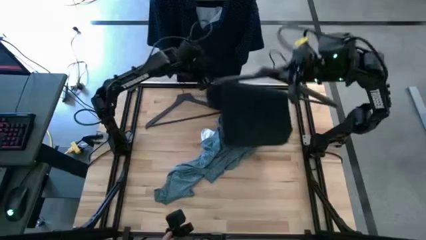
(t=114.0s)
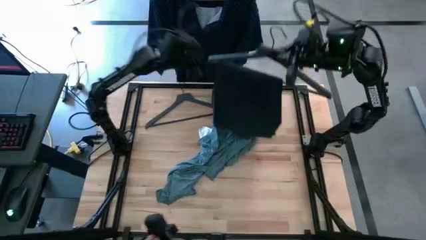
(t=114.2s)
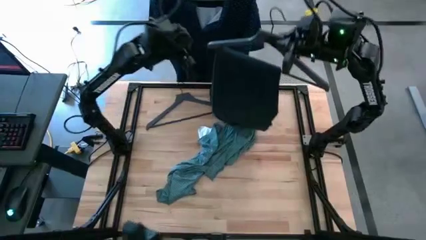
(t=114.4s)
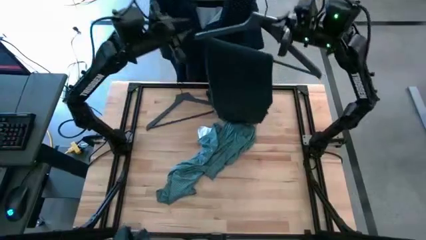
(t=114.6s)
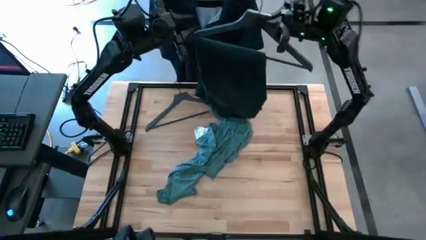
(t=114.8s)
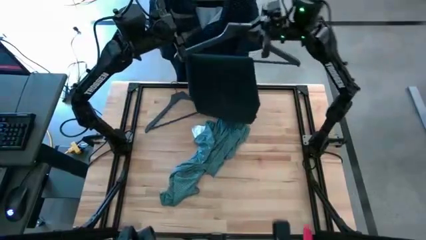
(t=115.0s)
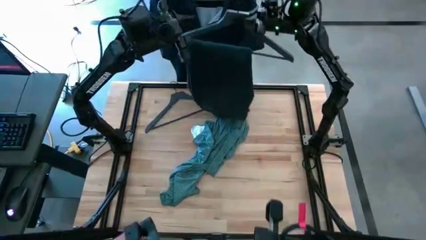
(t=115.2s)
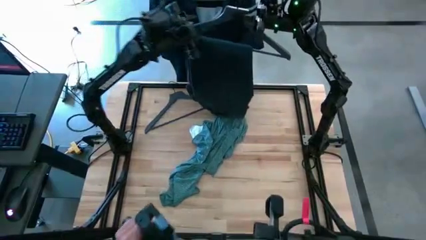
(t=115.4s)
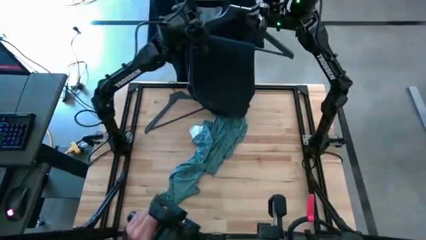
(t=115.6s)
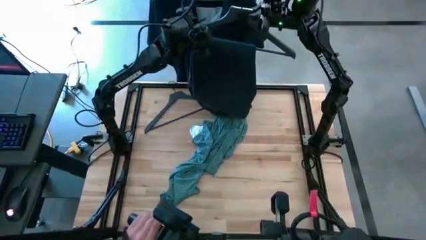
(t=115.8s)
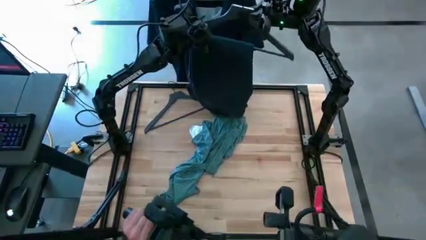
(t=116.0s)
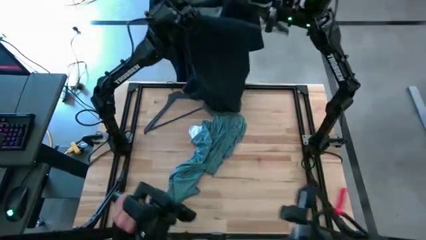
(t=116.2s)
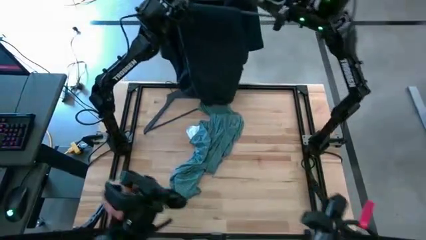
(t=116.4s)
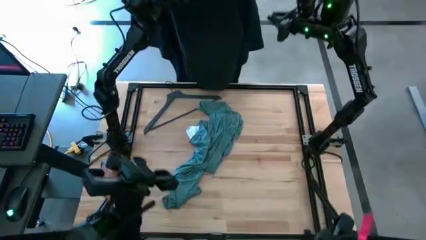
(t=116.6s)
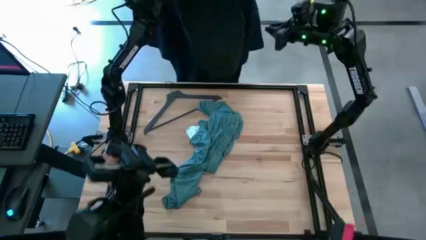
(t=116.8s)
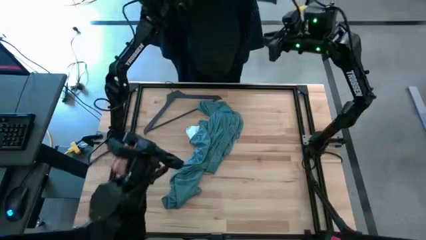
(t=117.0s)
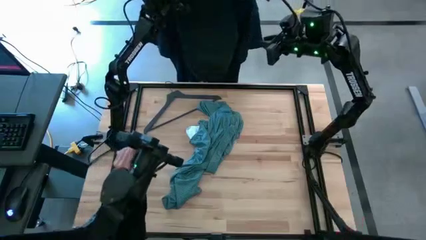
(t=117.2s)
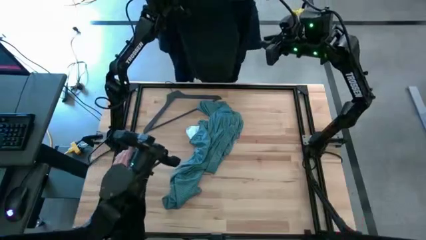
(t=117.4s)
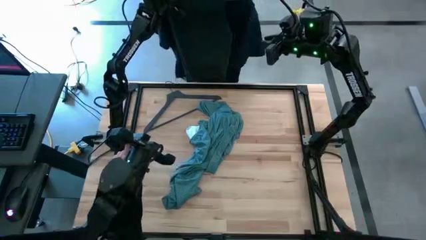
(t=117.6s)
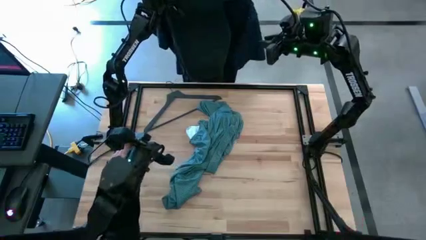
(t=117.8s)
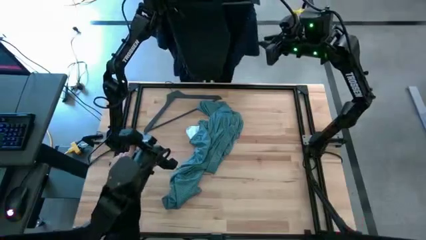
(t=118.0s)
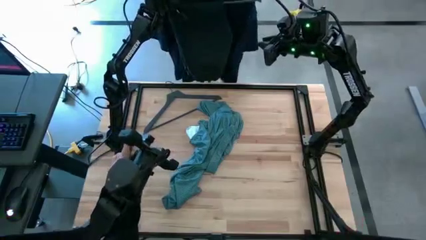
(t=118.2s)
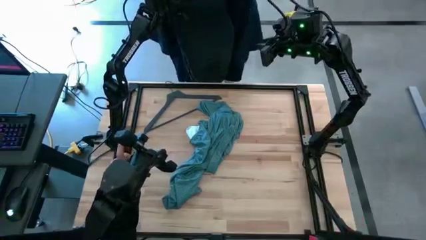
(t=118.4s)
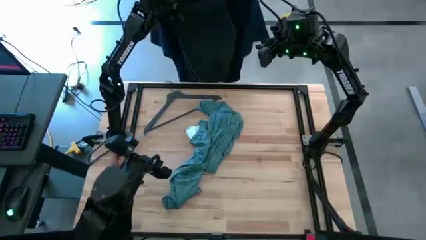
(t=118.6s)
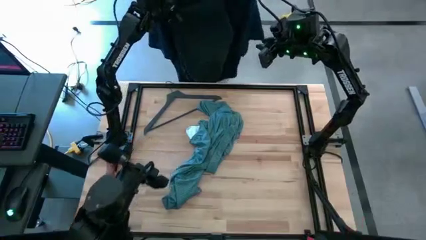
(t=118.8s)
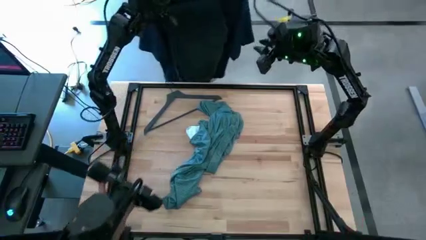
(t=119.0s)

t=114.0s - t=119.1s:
Task: Hang clothes
Hang the hangered blue pants on the hanger rack

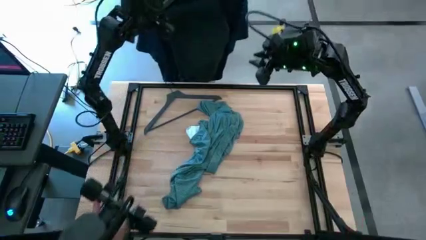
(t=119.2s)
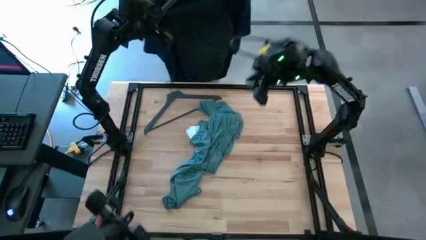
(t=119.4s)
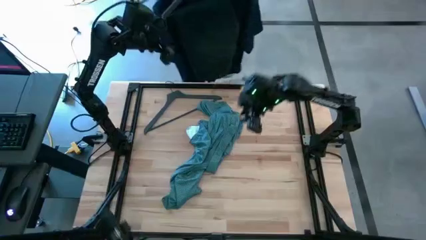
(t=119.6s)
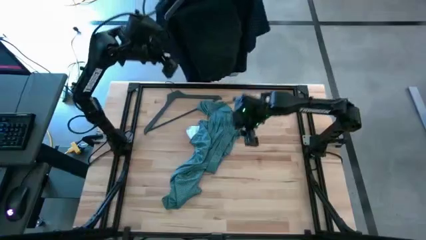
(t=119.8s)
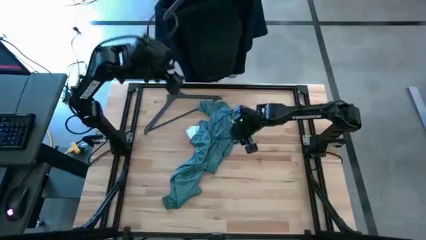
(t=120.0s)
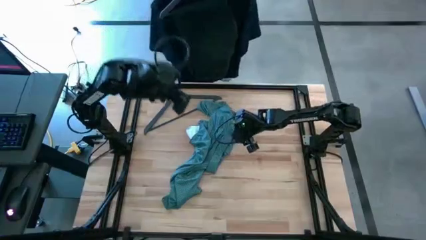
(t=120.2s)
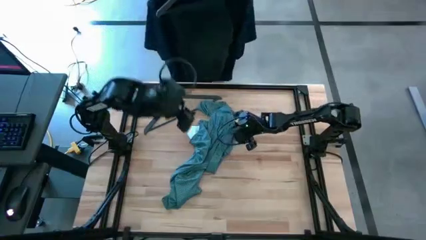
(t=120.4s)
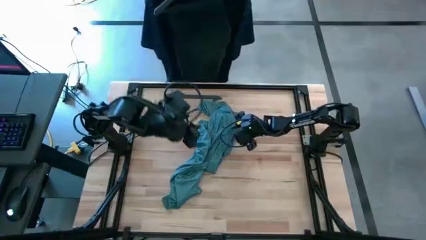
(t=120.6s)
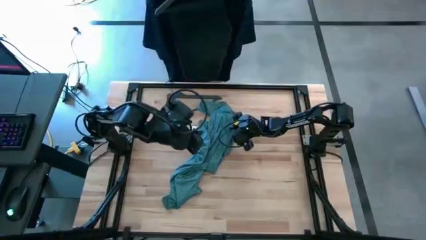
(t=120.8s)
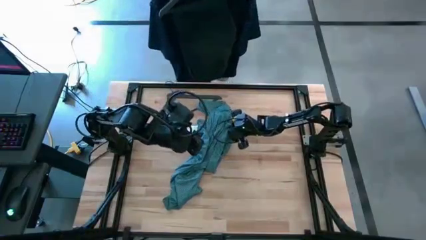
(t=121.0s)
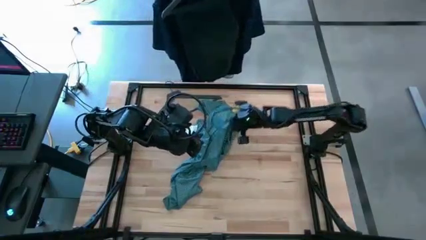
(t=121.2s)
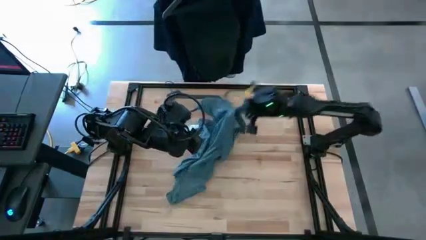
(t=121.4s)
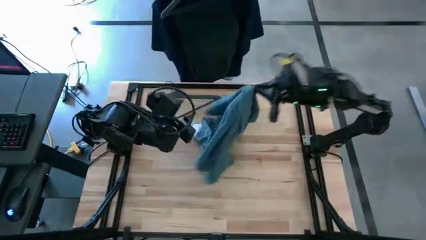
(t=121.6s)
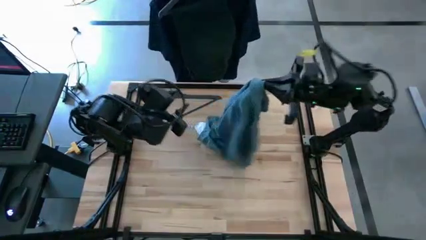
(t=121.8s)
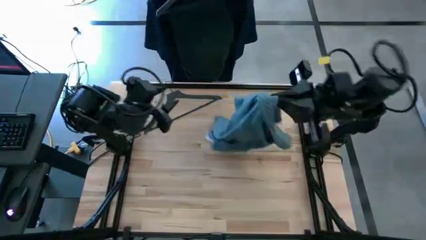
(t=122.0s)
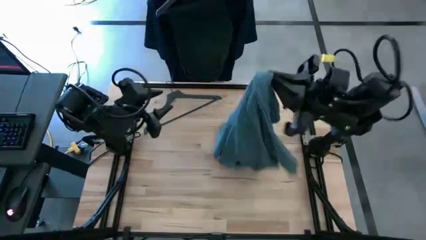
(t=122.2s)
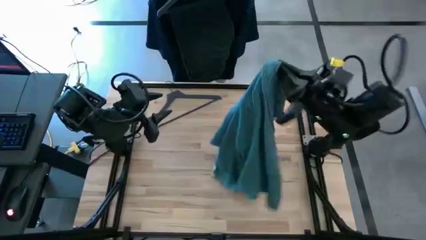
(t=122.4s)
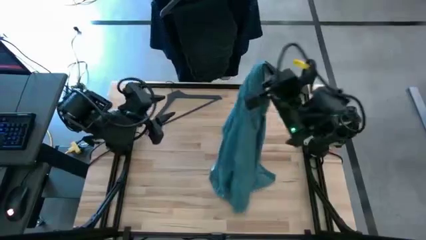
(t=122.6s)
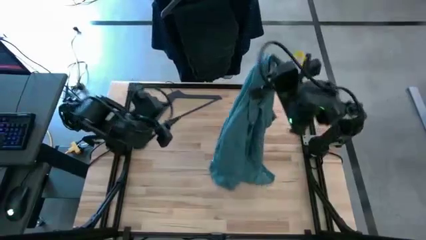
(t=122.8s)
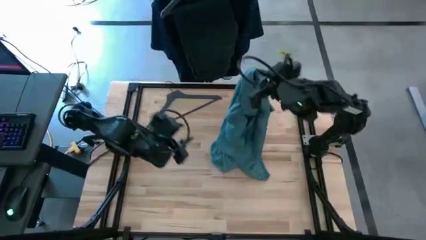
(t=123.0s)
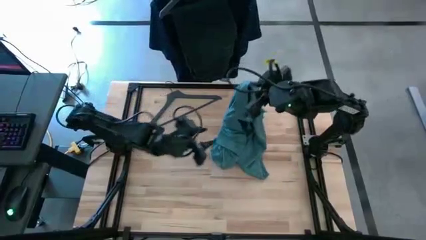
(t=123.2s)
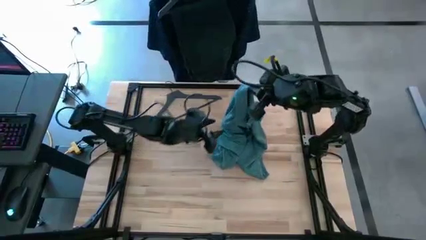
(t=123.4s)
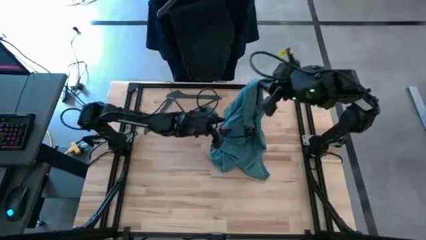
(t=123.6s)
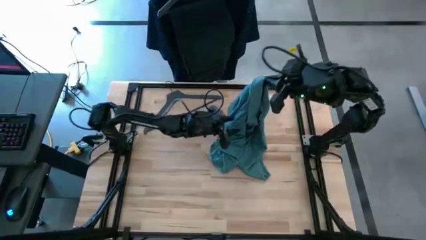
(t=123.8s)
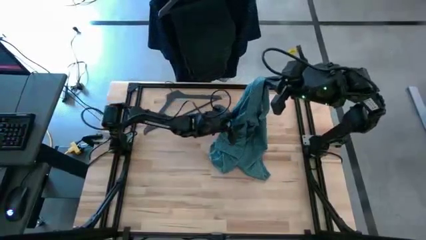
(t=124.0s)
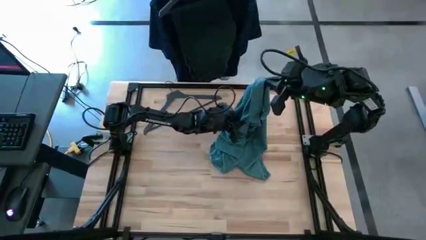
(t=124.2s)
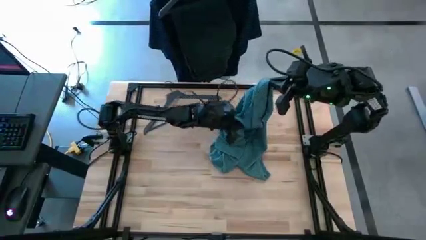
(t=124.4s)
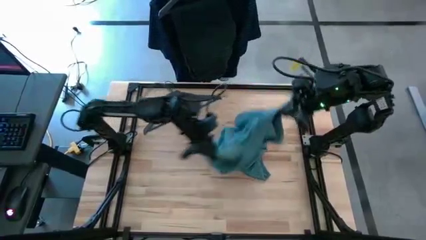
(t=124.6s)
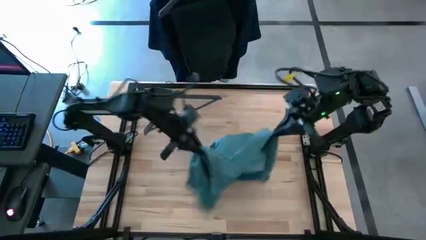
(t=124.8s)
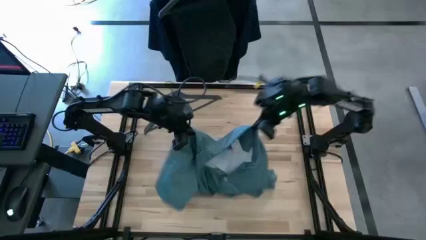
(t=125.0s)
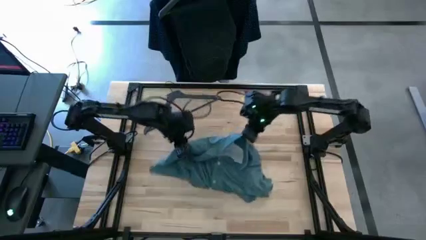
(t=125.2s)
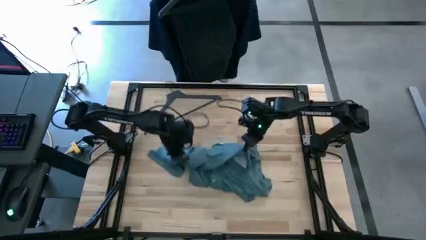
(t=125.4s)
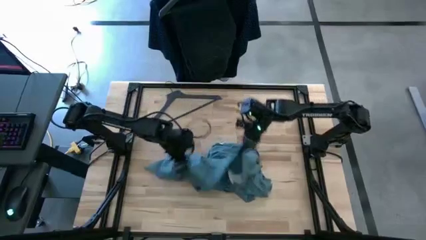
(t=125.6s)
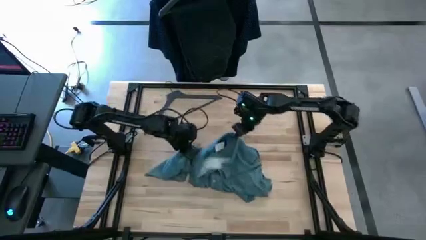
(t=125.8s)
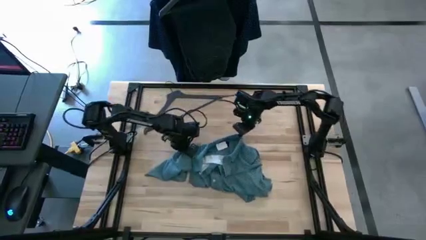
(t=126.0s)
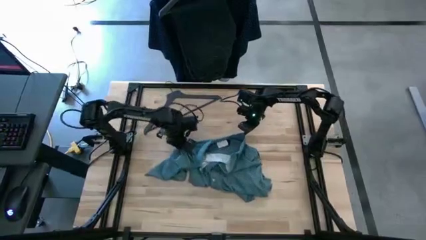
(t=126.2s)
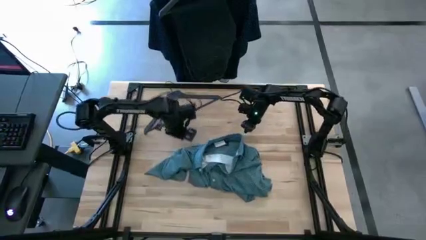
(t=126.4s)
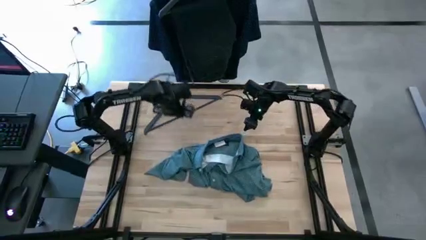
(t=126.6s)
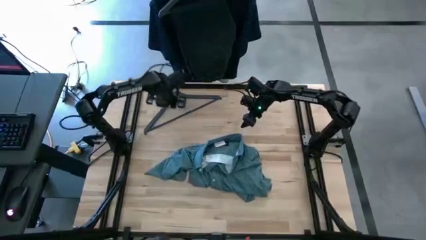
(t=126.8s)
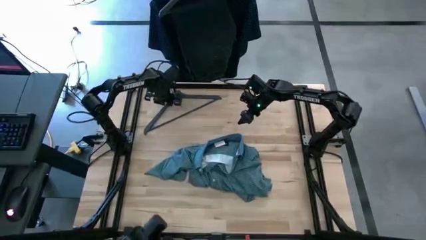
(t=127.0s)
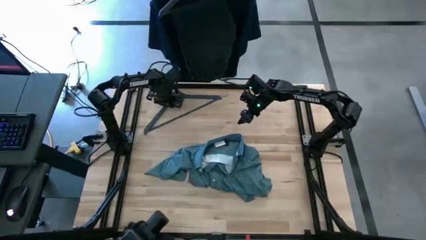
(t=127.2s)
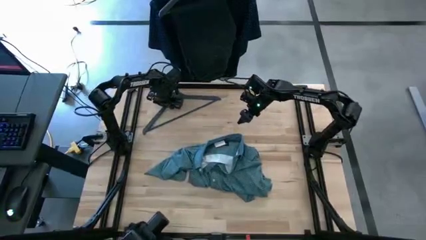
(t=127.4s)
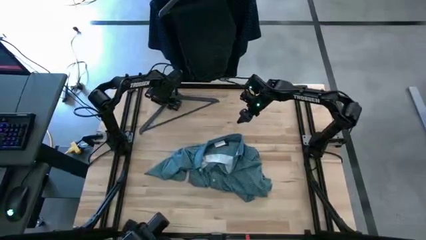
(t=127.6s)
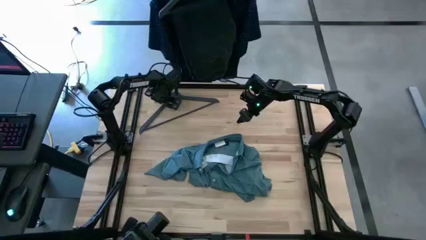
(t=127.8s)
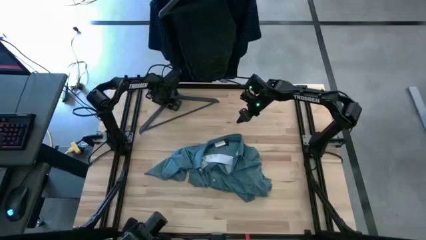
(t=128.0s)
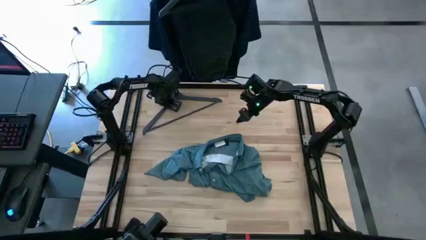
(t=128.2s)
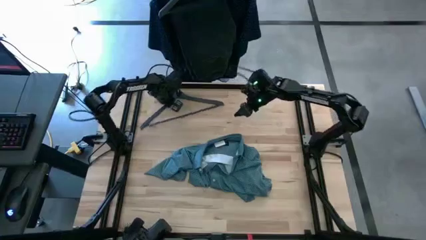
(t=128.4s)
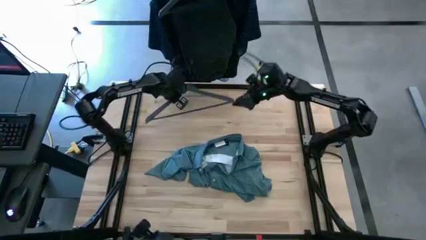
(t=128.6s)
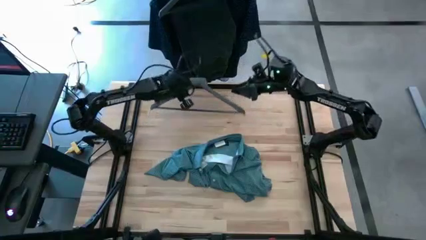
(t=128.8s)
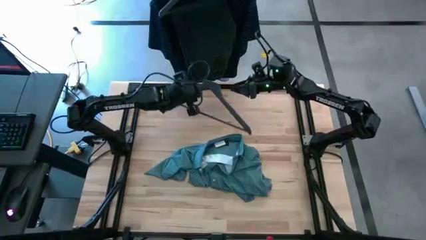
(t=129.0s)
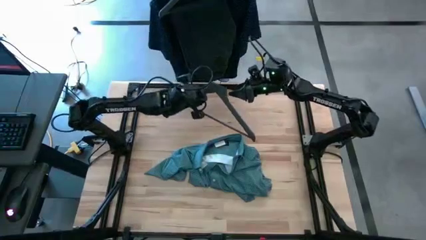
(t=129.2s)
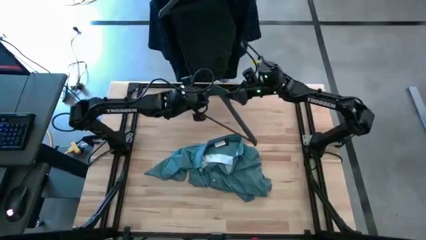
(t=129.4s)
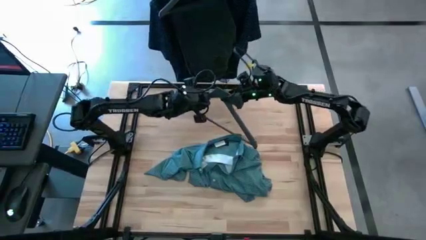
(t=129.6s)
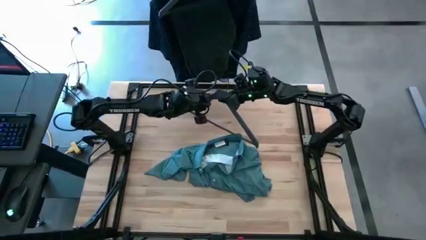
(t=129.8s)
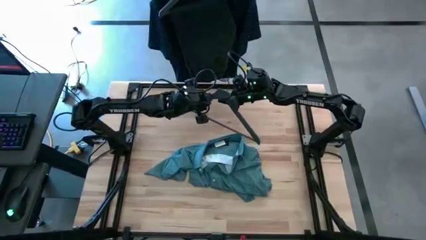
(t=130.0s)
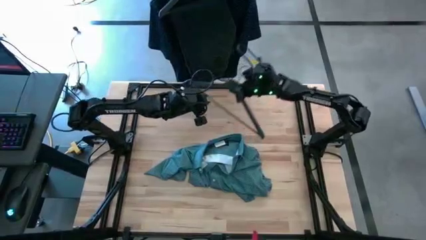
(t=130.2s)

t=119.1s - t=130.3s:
Insert the hanger into the light blue hanger shirt
